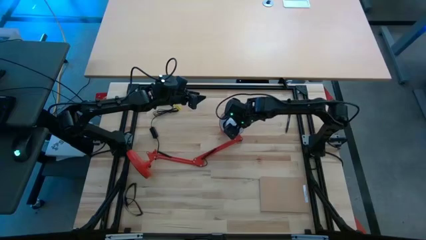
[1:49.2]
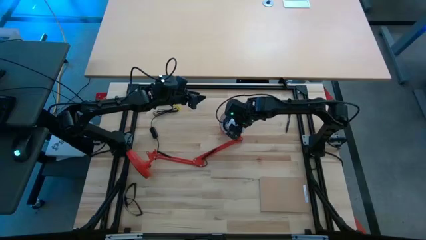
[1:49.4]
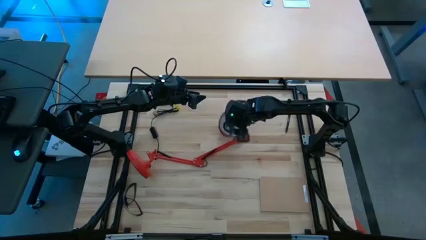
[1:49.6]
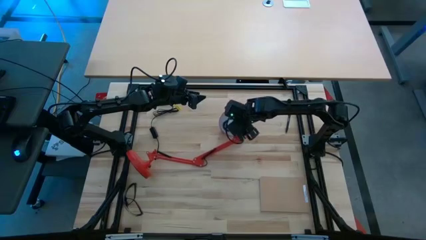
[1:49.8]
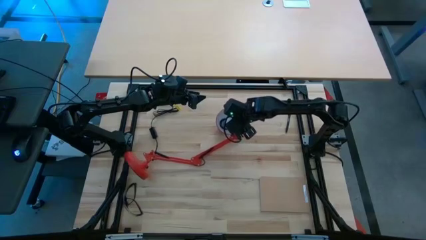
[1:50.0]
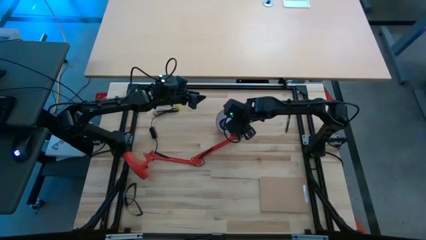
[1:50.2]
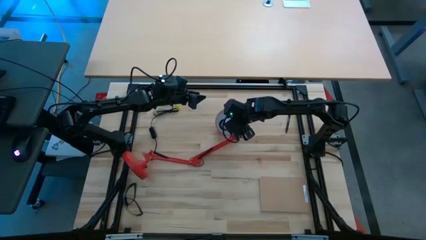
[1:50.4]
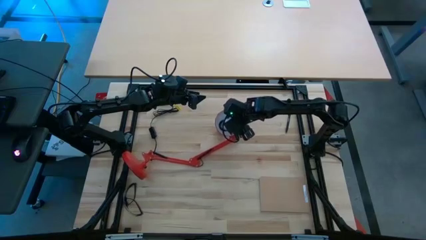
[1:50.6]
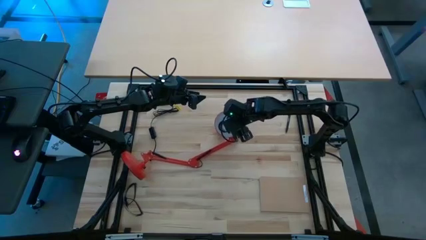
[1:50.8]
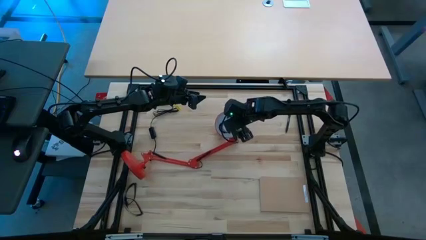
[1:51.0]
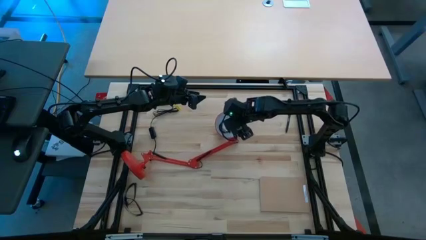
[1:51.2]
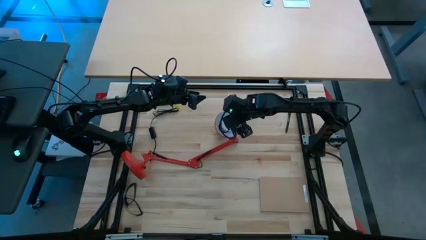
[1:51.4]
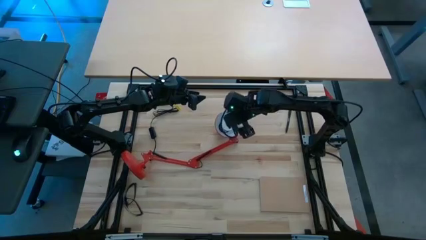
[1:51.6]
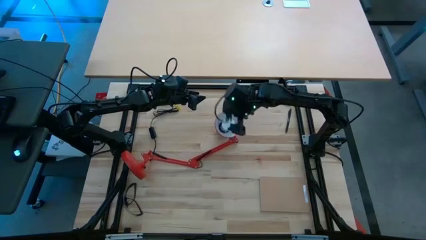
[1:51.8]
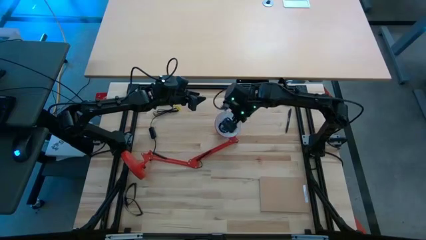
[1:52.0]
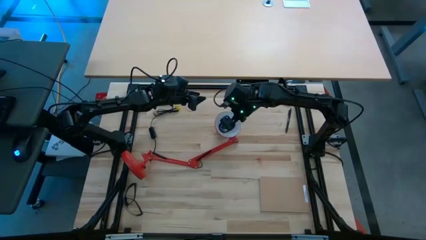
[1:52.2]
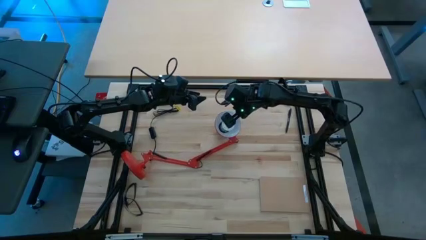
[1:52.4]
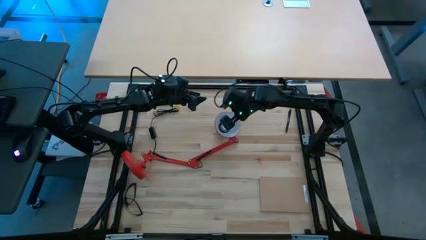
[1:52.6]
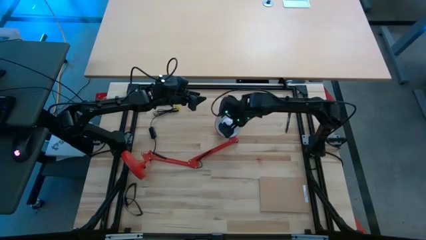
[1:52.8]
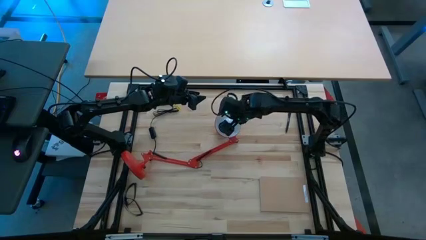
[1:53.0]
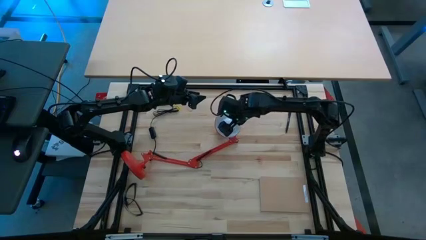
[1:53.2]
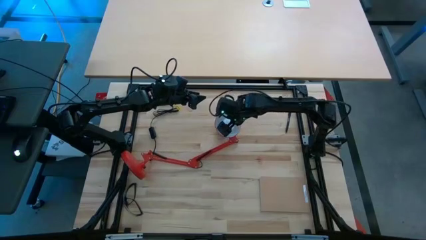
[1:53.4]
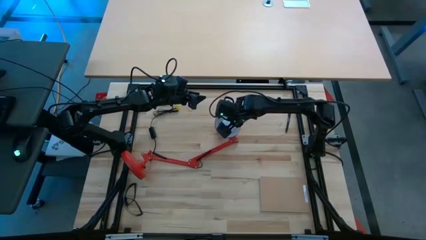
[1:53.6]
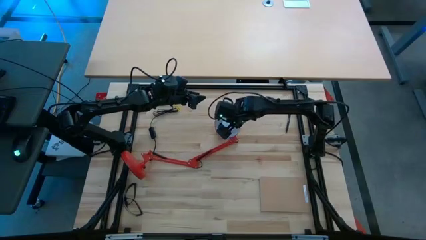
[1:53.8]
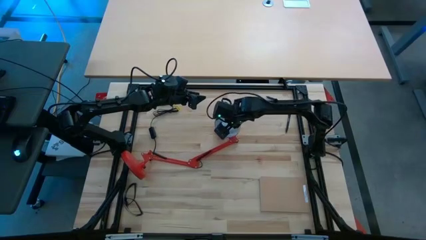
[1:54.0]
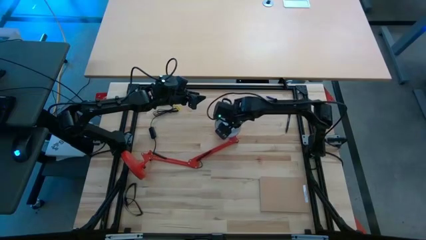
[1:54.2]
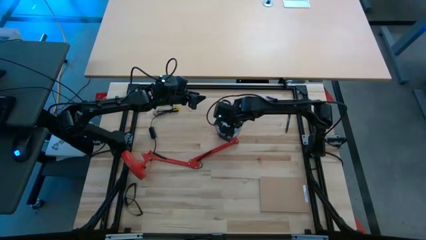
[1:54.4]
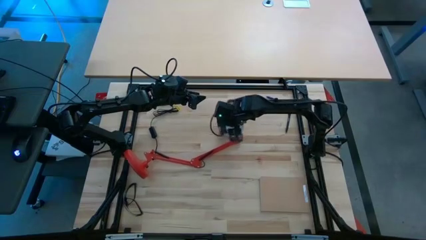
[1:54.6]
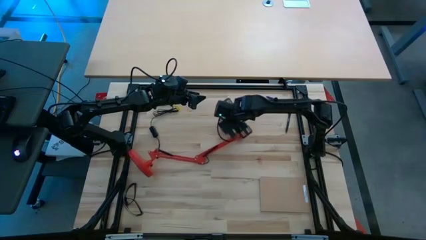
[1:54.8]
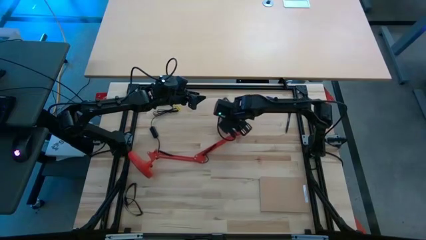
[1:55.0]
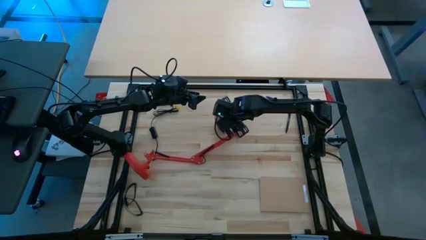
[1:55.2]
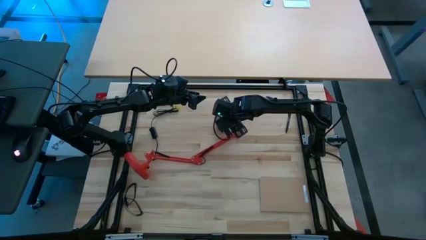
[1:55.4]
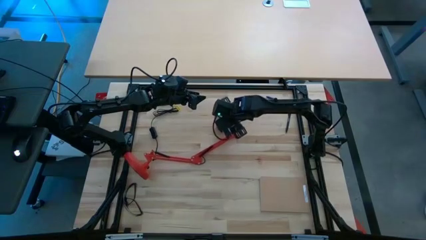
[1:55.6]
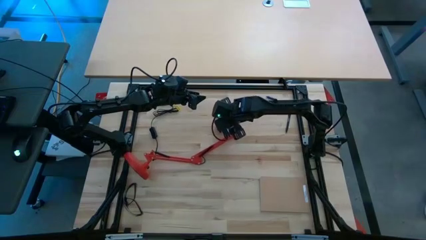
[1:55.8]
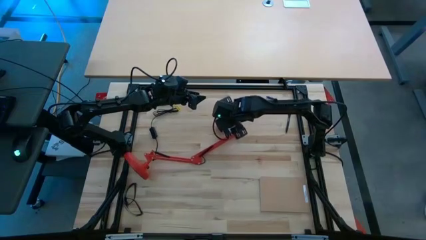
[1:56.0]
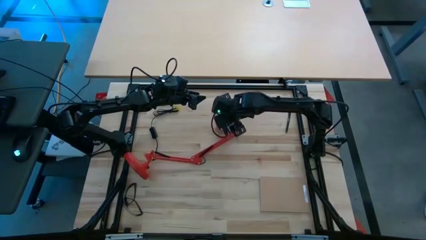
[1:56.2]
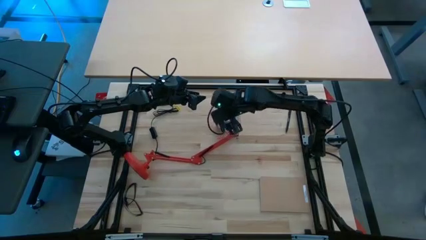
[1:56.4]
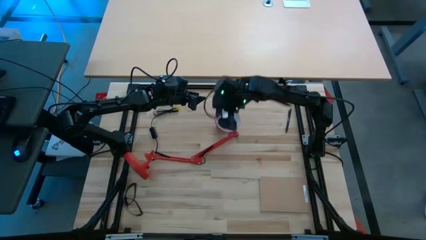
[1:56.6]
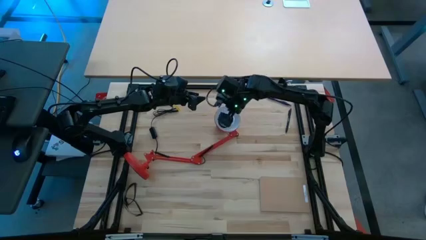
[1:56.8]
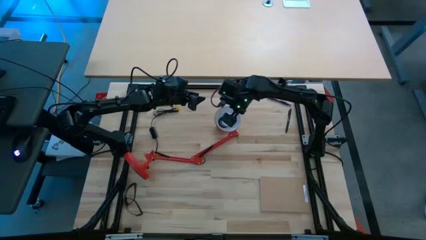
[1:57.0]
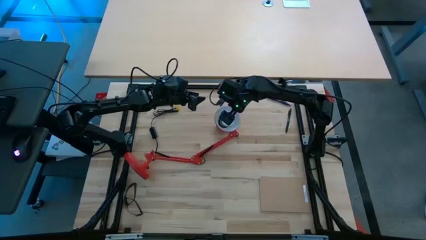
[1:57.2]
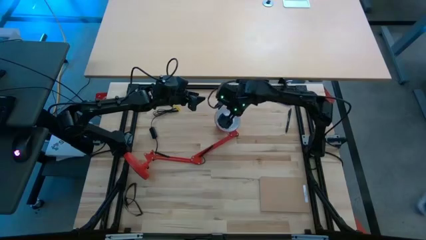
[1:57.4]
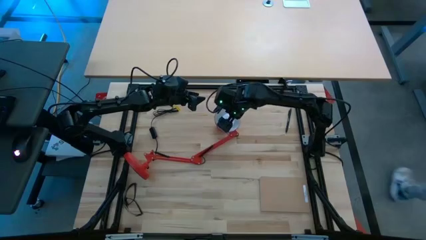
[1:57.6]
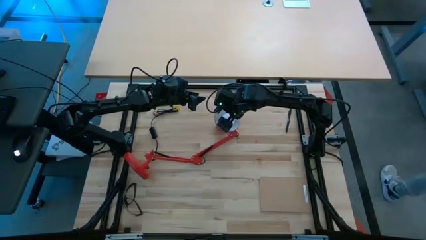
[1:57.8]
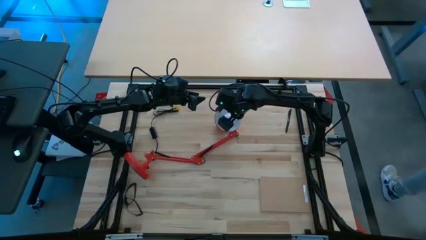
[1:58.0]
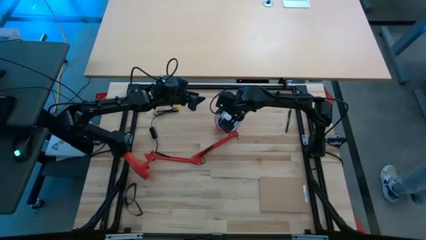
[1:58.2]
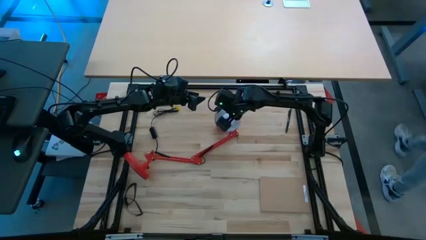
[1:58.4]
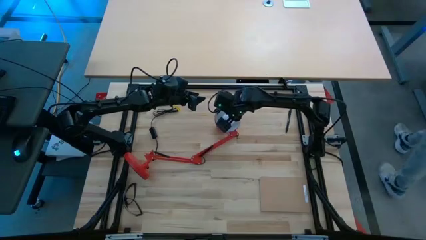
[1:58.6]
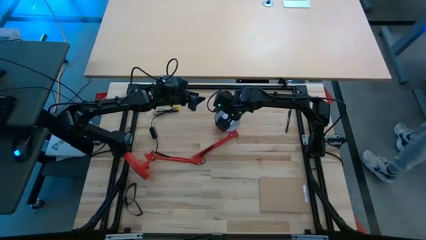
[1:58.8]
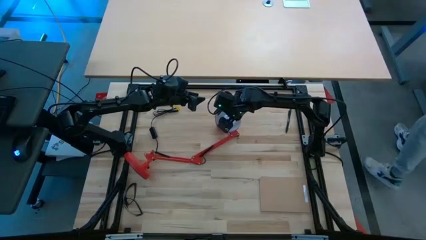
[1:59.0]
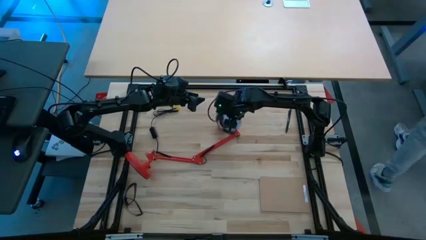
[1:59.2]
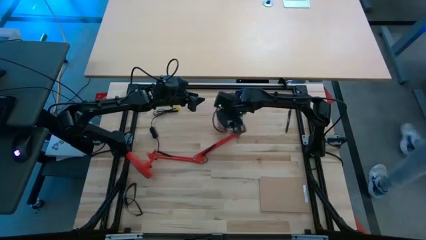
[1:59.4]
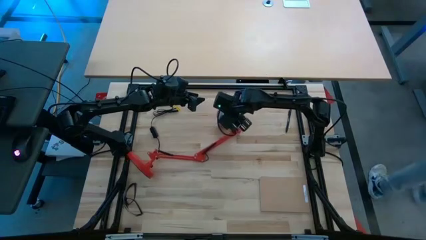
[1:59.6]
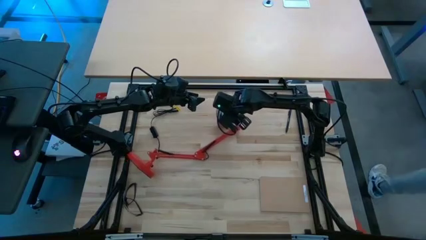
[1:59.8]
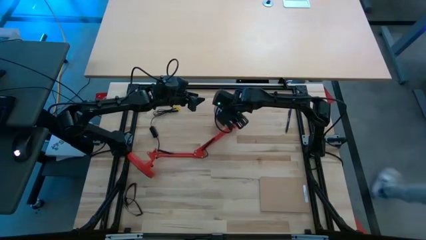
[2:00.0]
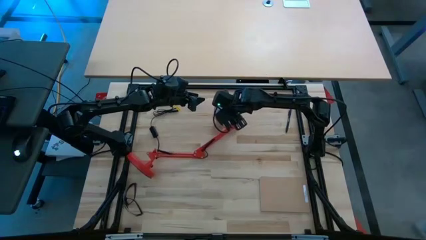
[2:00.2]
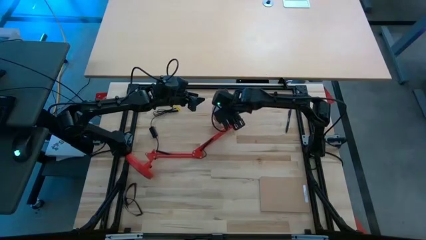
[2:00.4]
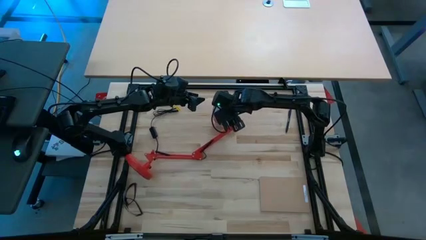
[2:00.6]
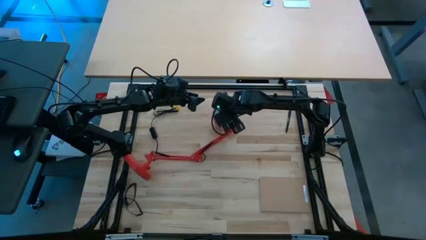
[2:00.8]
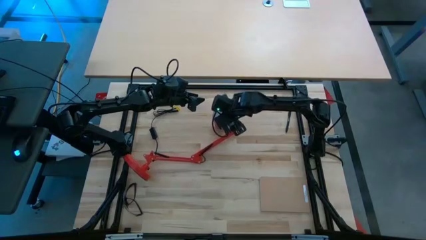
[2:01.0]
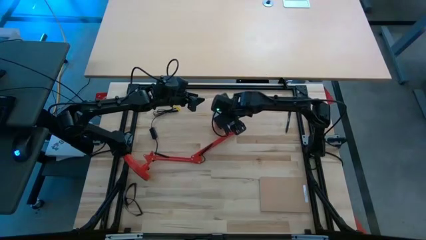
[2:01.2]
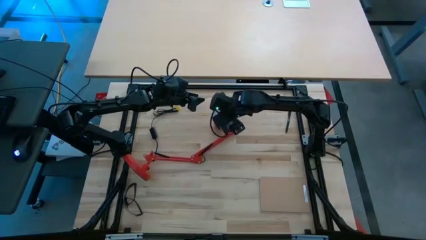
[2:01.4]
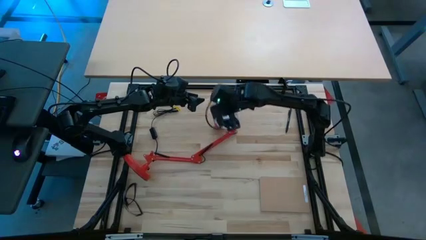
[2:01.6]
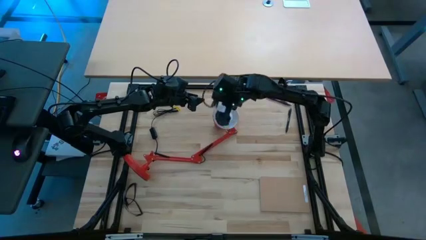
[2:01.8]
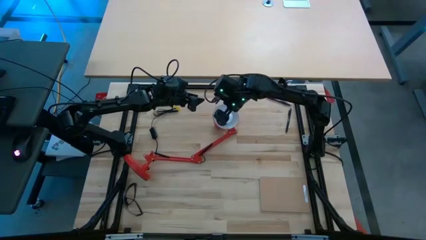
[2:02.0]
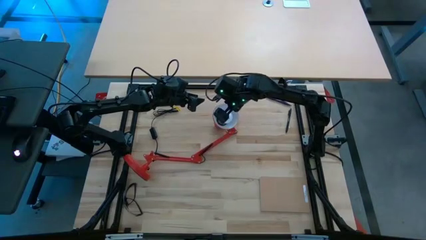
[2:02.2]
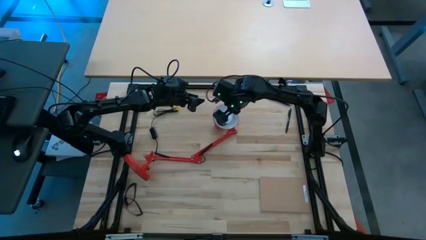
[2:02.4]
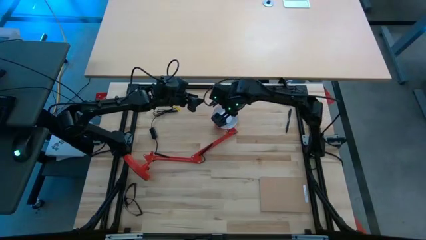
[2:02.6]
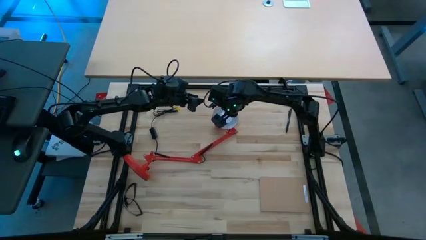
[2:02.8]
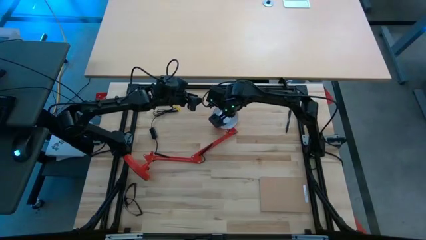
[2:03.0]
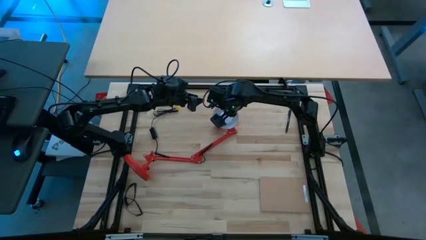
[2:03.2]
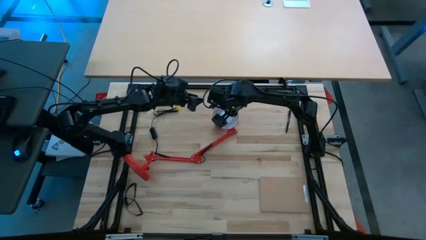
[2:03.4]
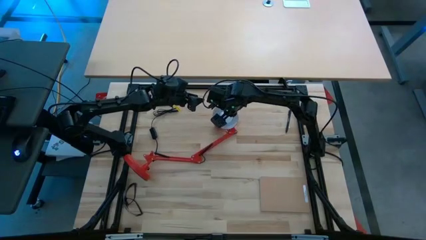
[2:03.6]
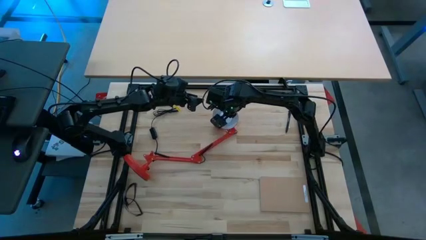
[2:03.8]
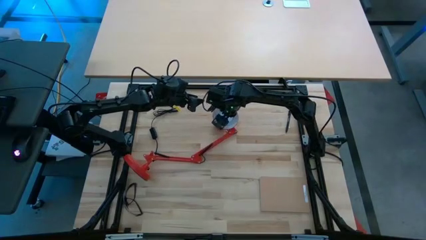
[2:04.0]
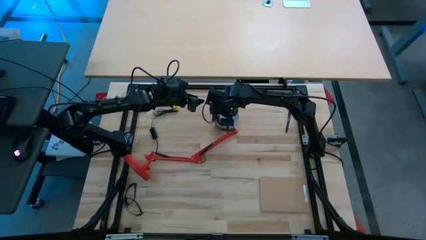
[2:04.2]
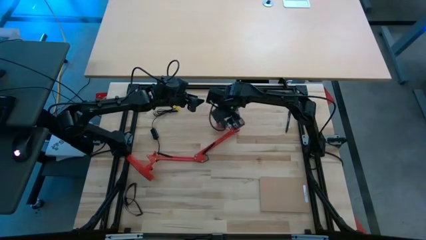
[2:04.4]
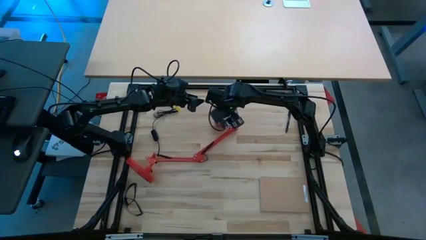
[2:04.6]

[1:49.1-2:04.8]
Task: Screw lightbulb
Remove the lightbulb from the desk lamp
